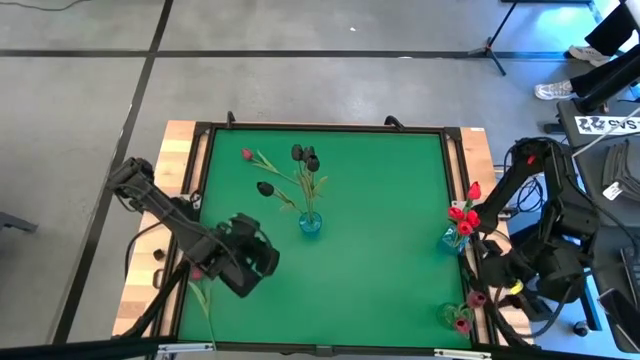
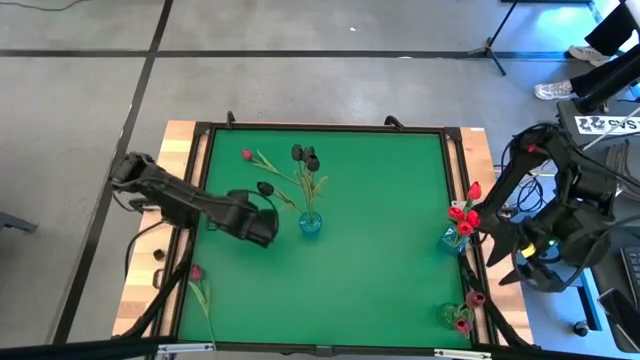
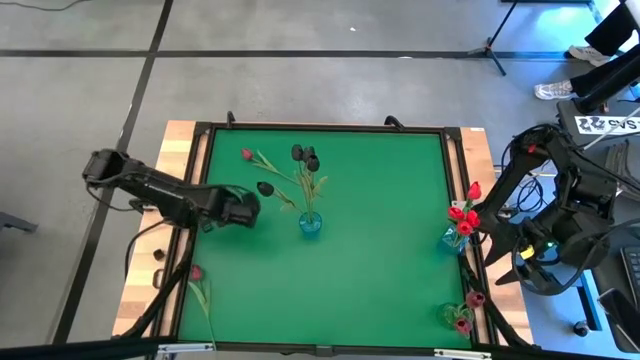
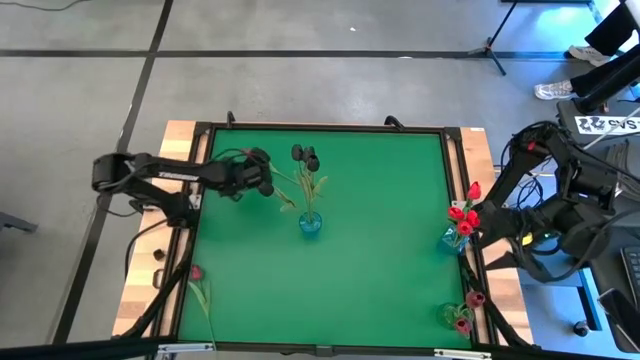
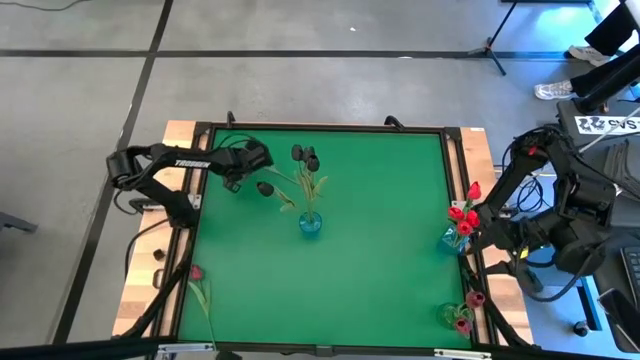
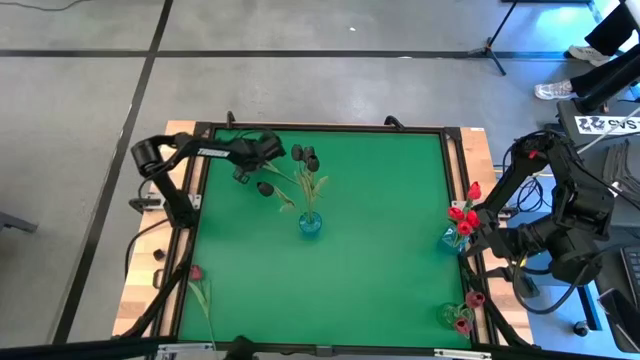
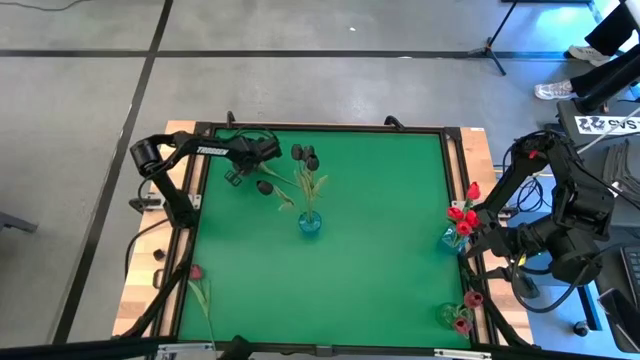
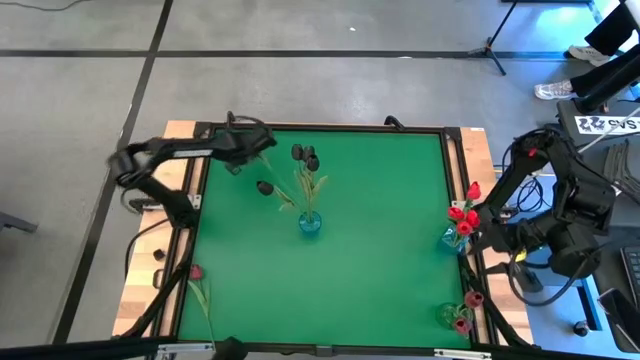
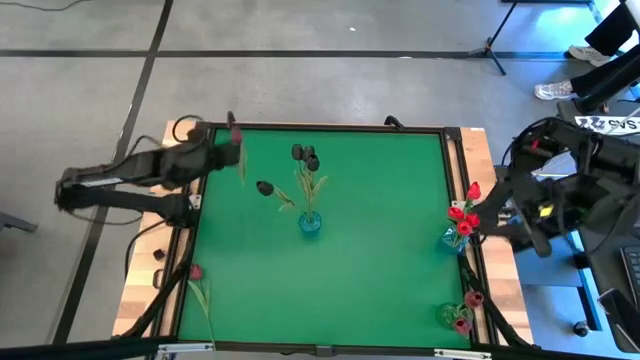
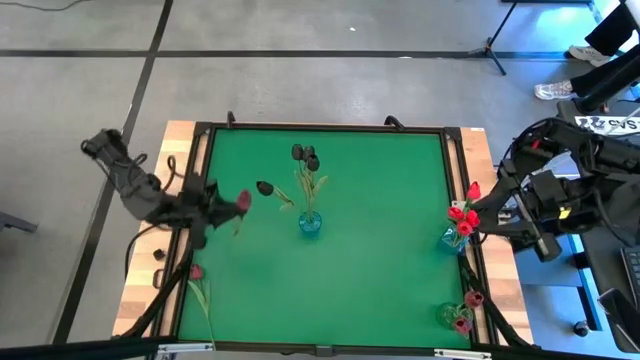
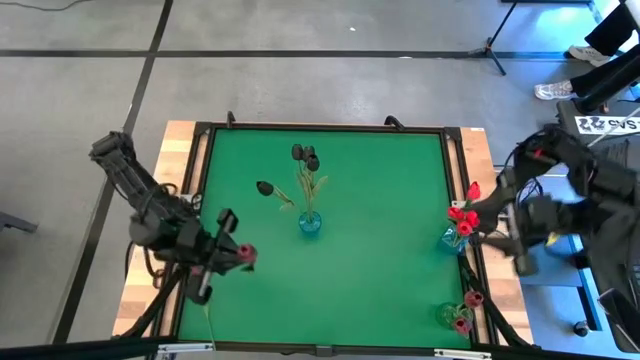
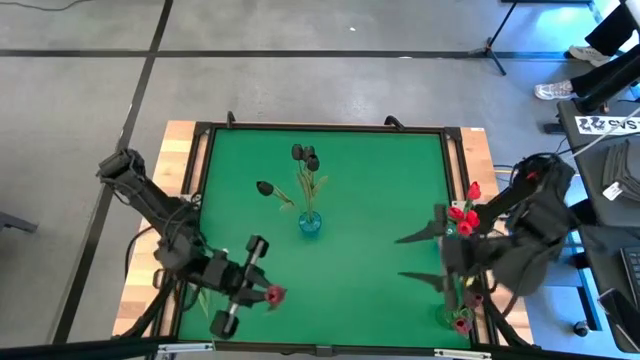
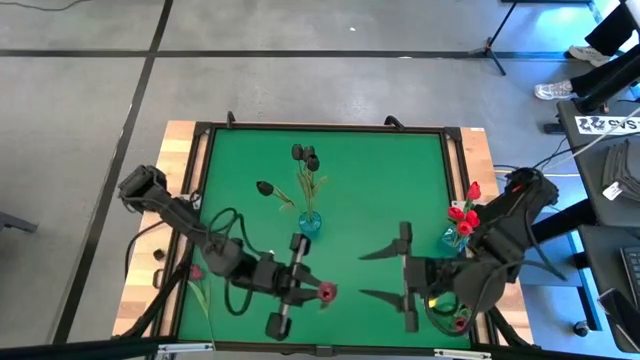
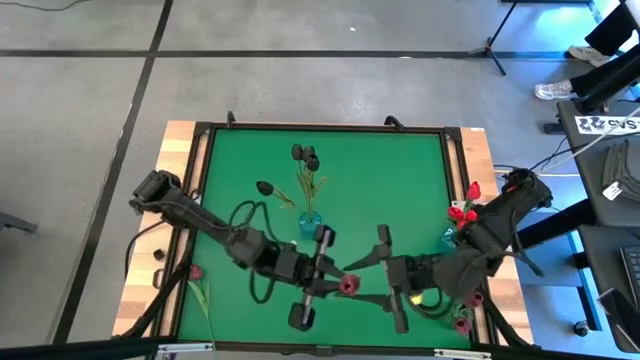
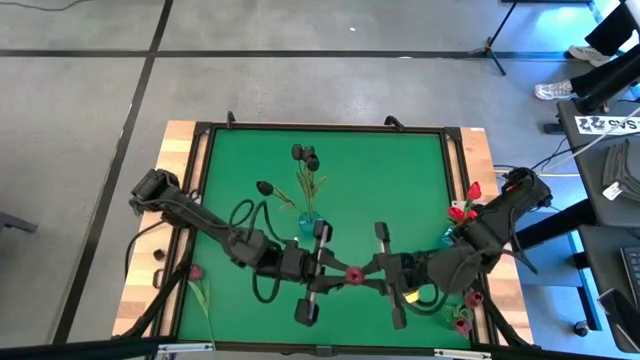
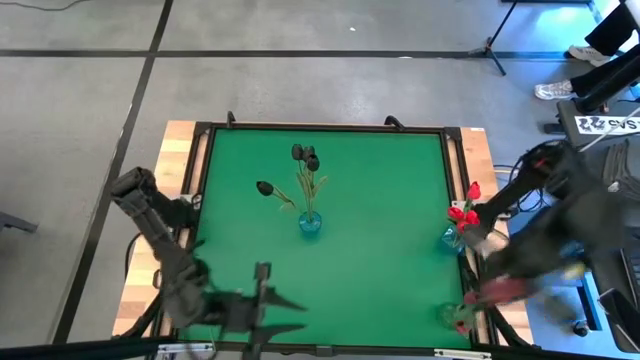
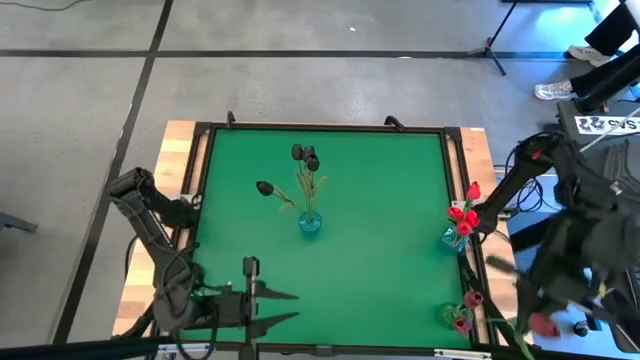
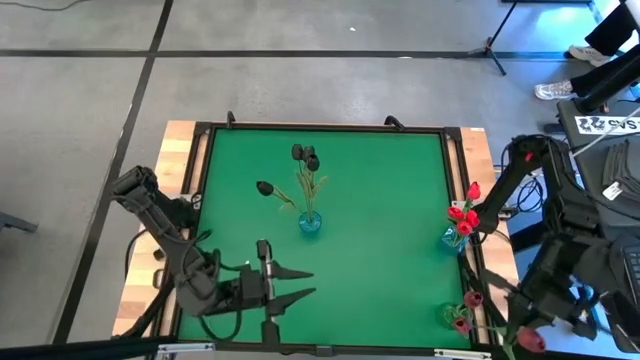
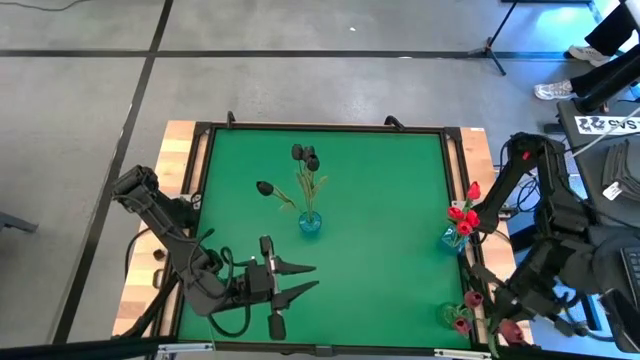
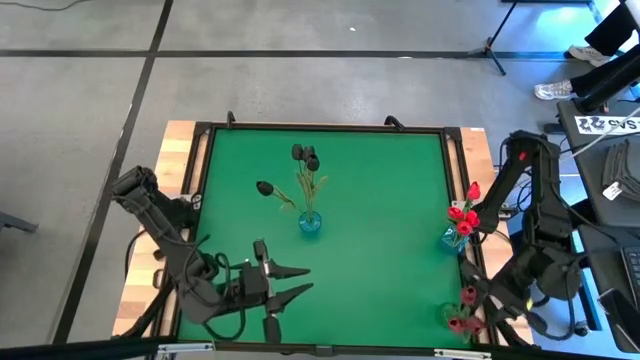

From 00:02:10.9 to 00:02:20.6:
Task: Sort flowers into vase by color
Put the dark red flower into the green vase

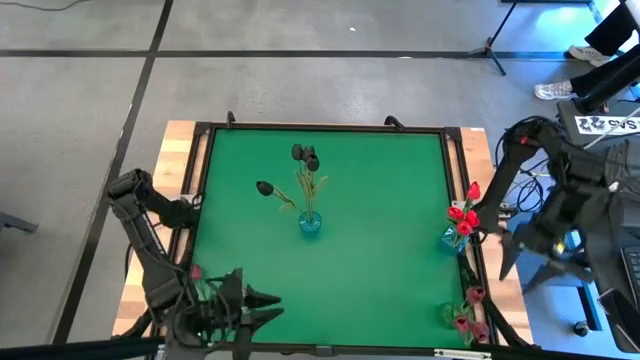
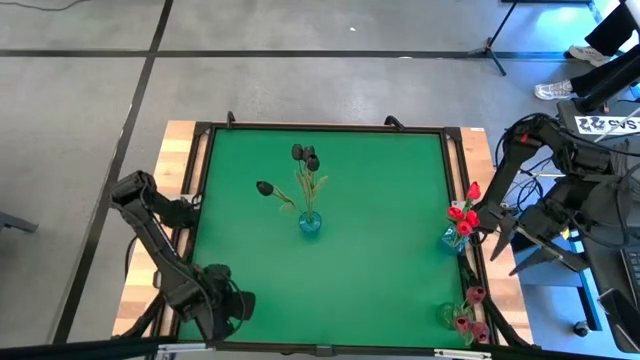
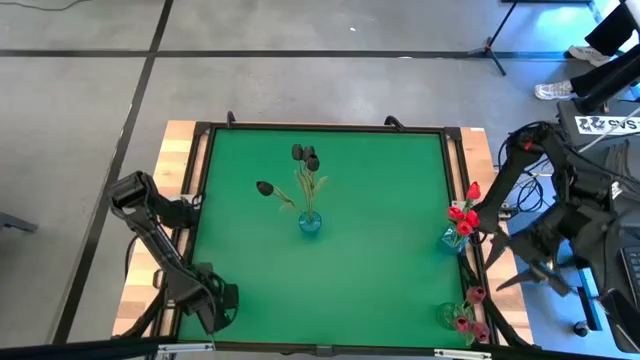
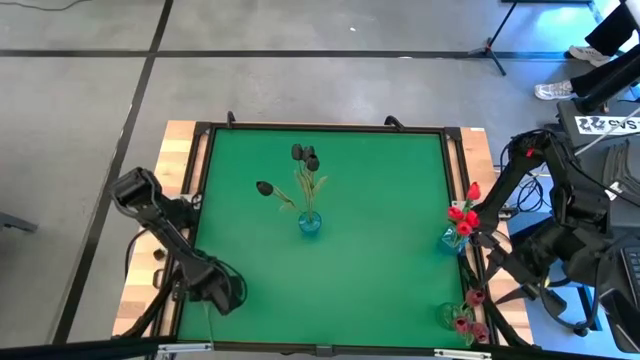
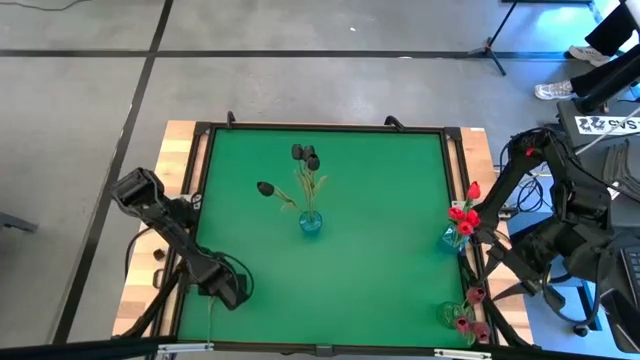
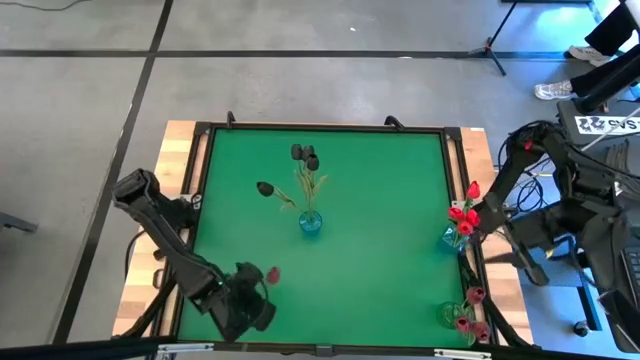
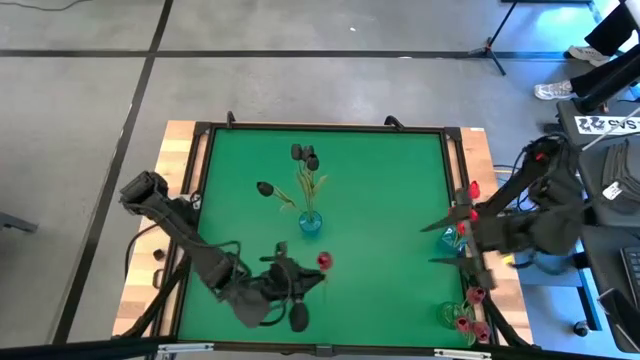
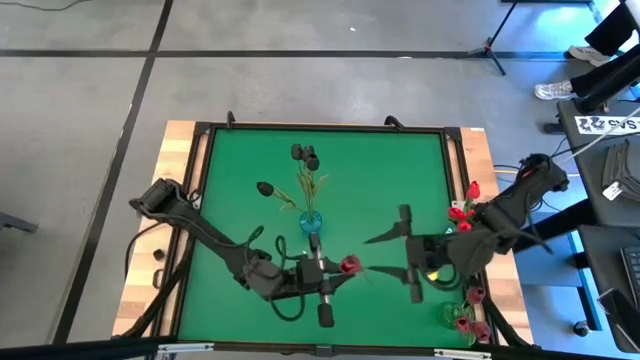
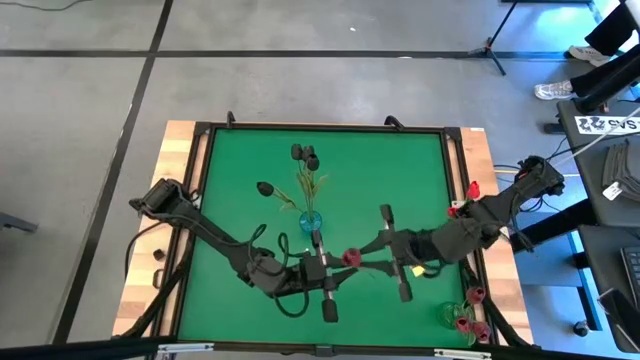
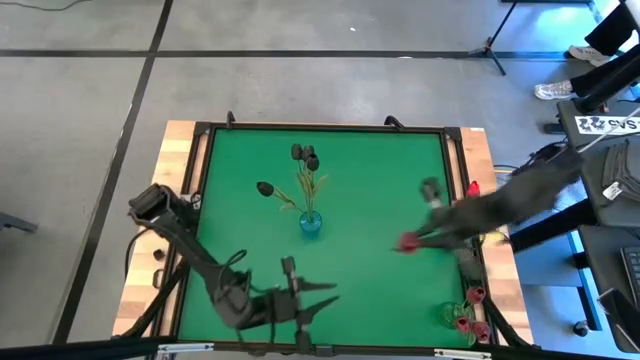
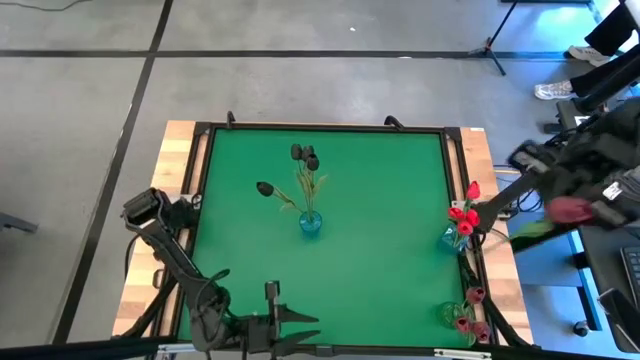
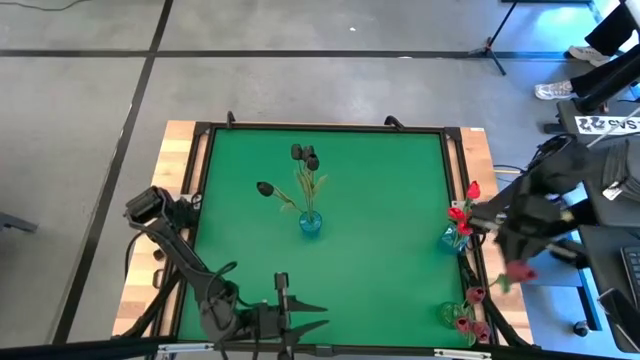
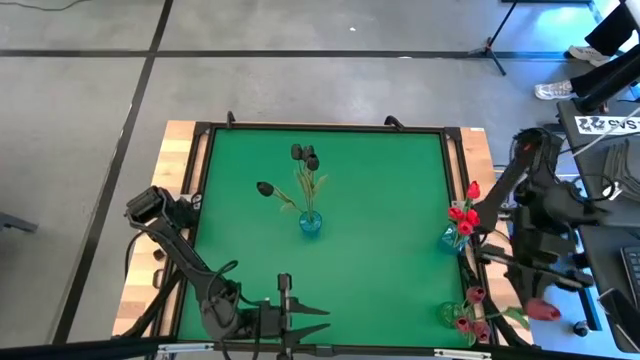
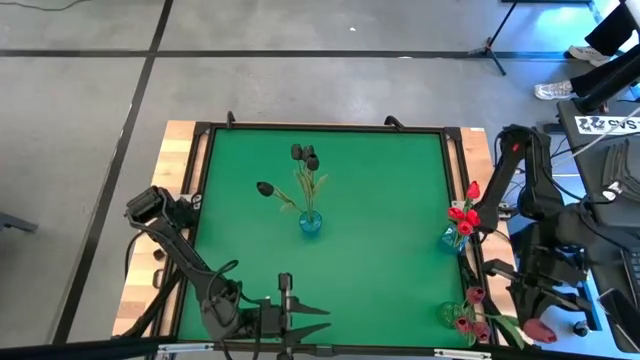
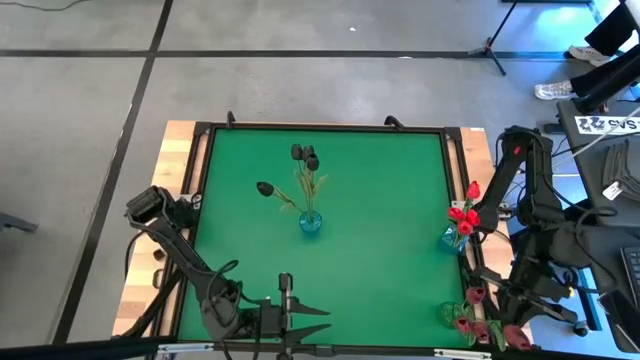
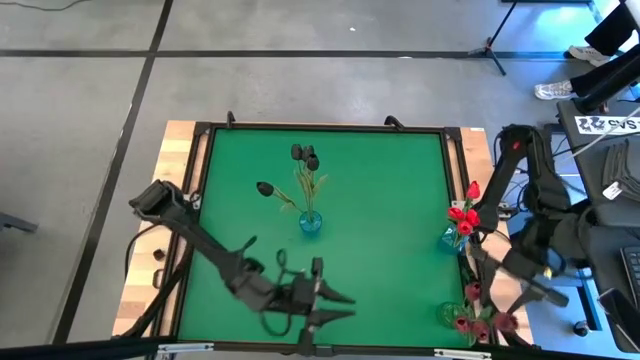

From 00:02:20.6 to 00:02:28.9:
Put the dark red flower into the green vase

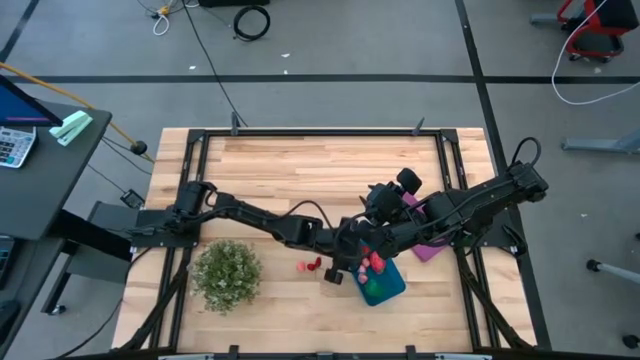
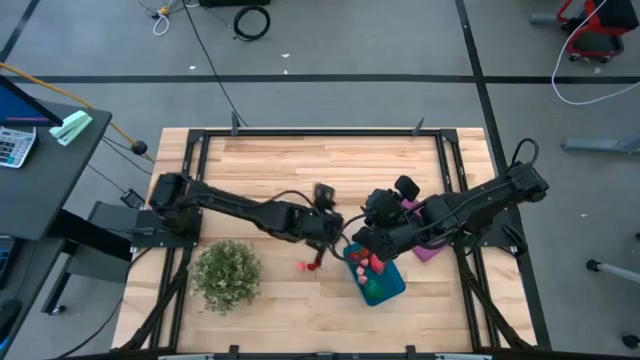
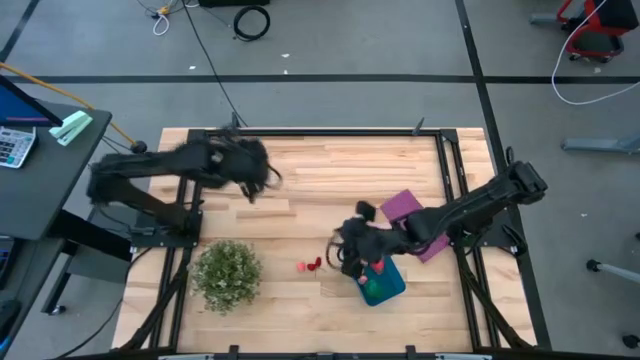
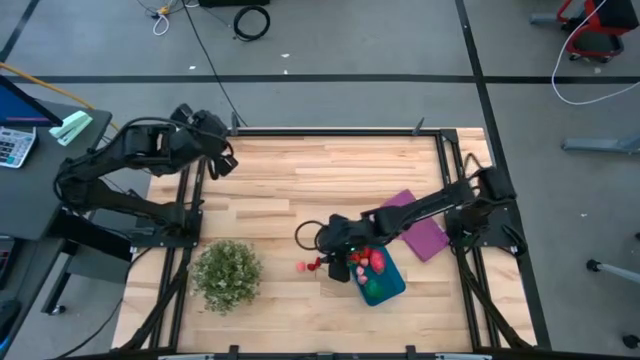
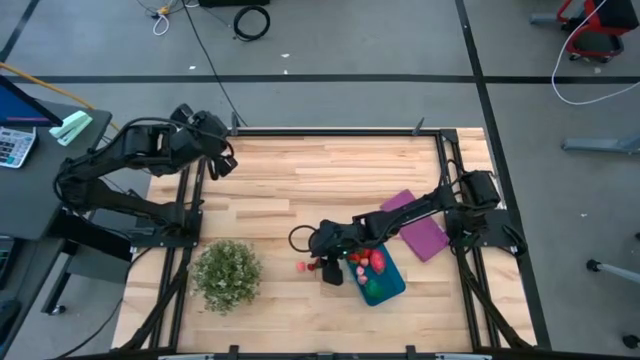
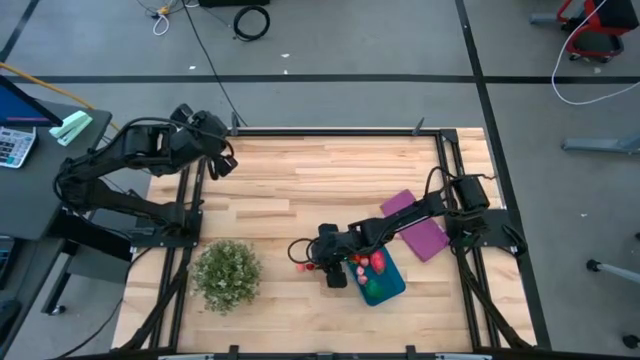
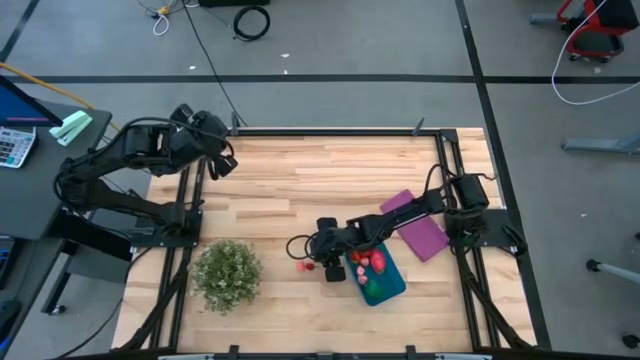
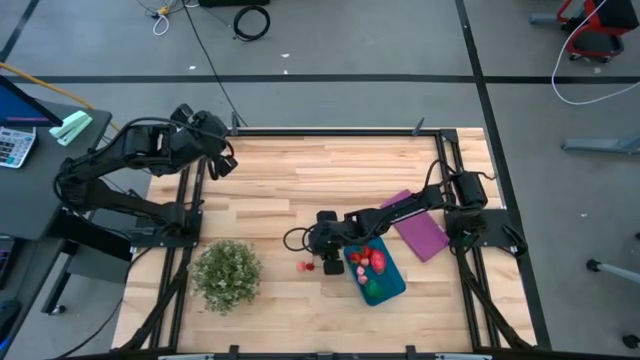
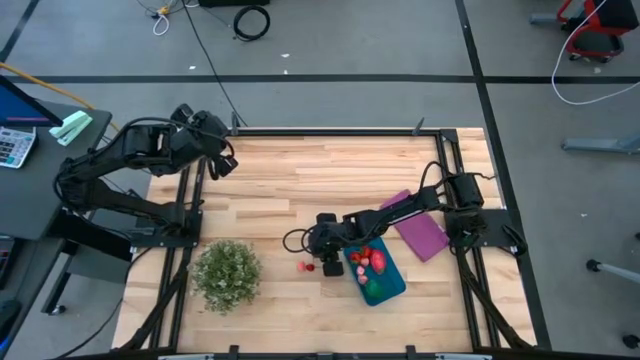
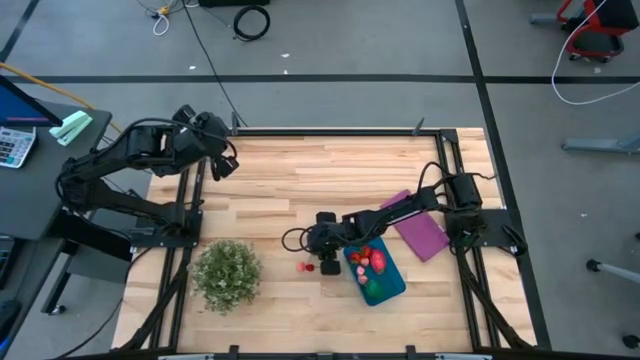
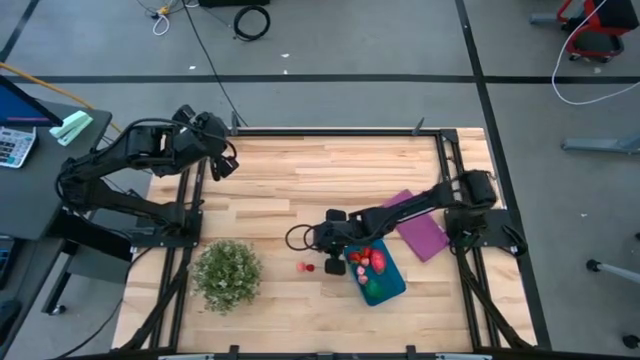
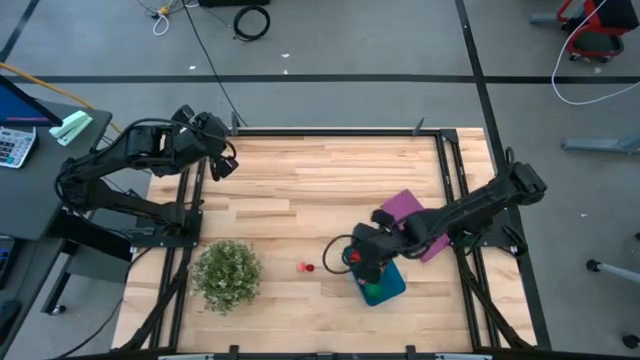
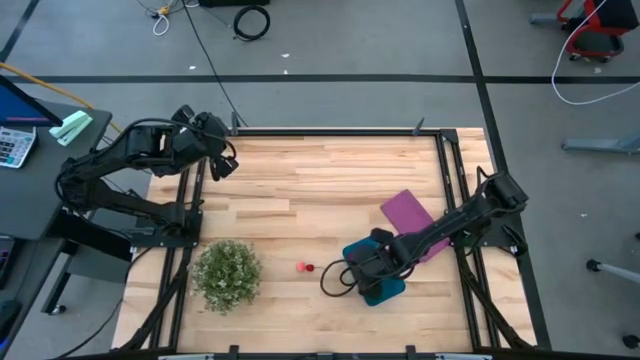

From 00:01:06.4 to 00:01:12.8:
Task: Pick and placing Produce into tupperware
Put the right red cherry into the blue bin
